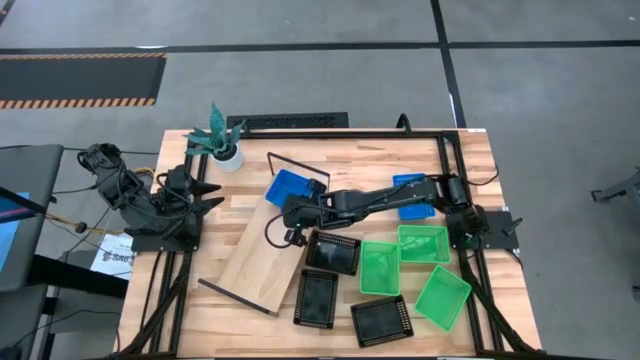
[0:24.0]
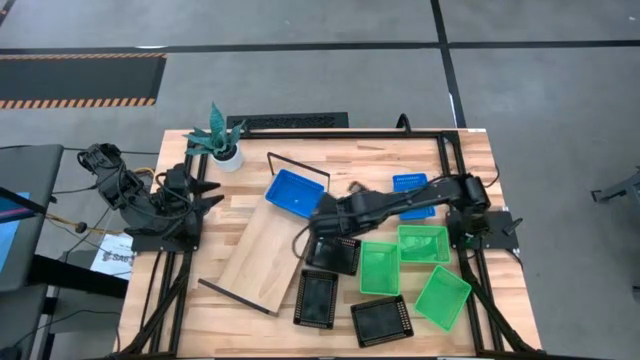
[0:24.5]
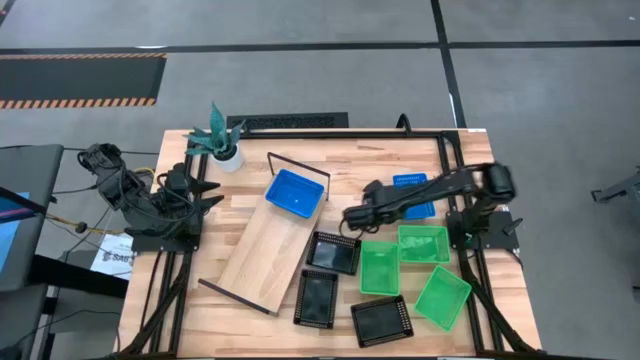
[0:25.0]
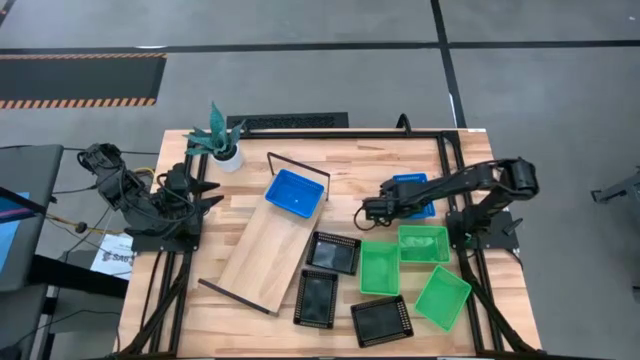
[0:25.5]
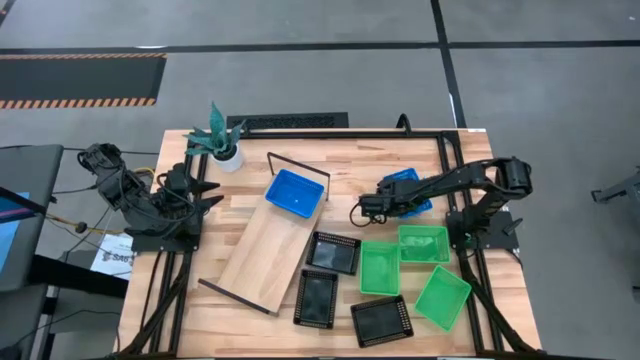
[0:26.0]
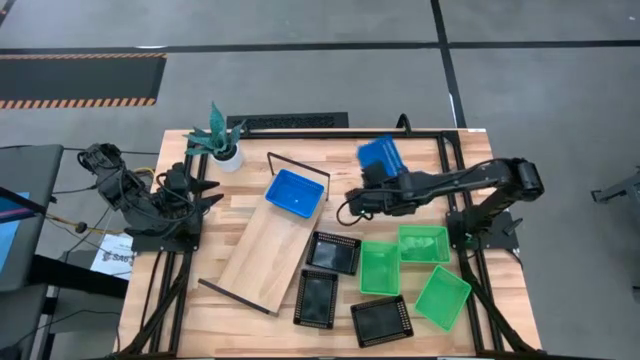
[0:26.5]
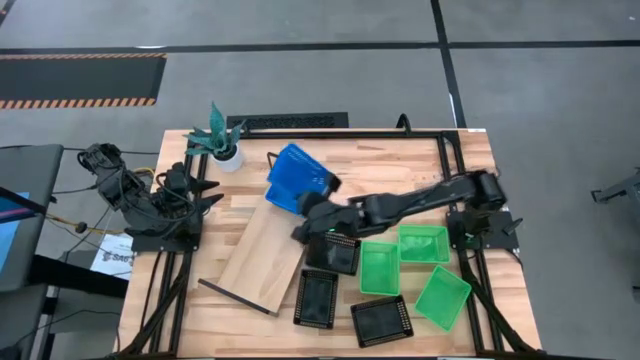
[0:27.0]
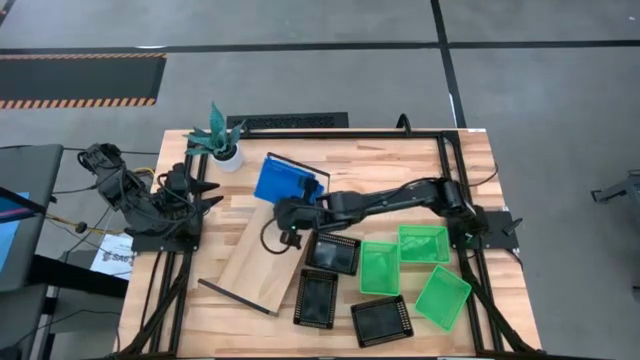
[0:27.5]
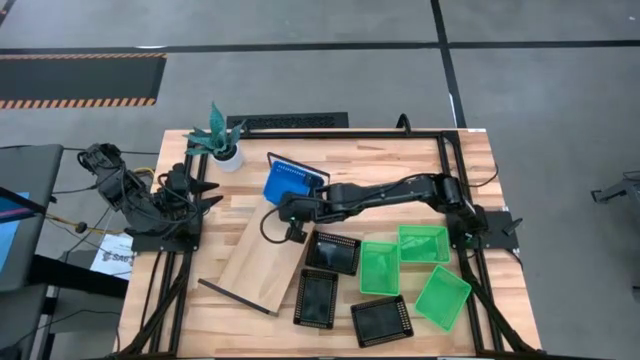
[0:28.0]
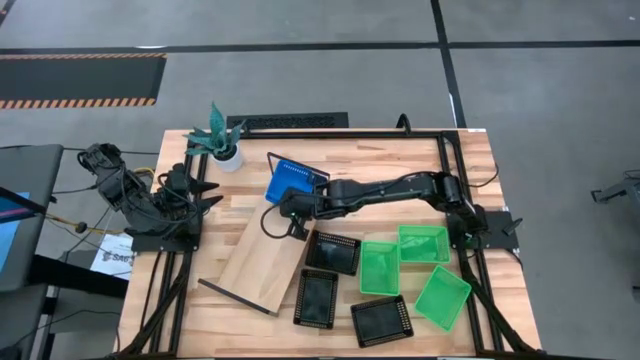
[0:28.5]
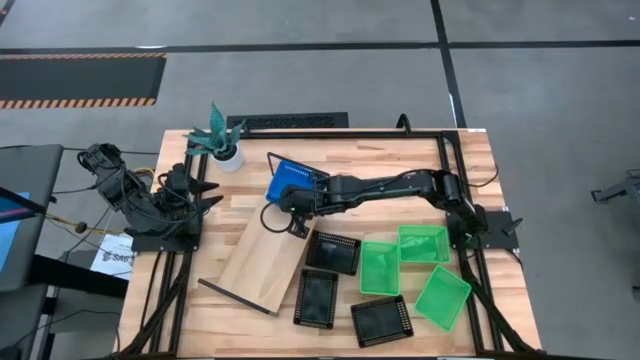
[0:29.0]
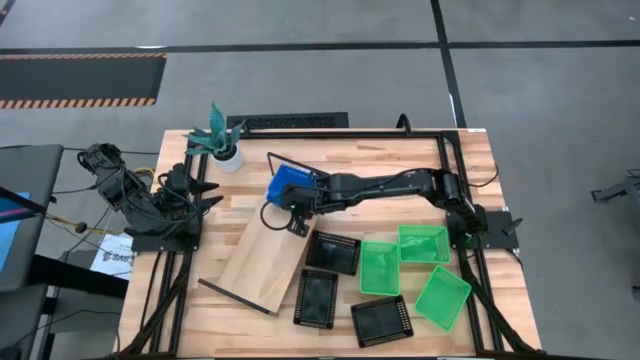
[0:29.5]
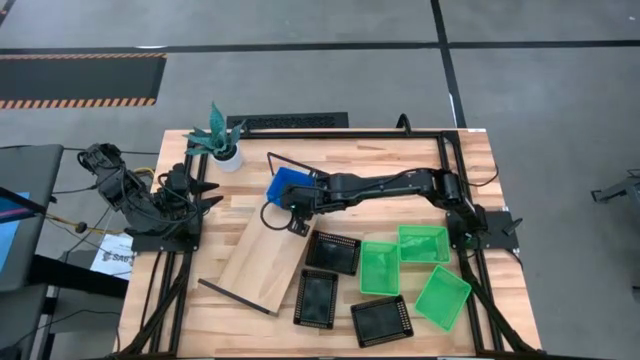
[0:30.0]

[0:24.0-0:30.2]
Task: Stack baskets on shelf by color
Stack the blue bin on top of the blue bins on the shelf

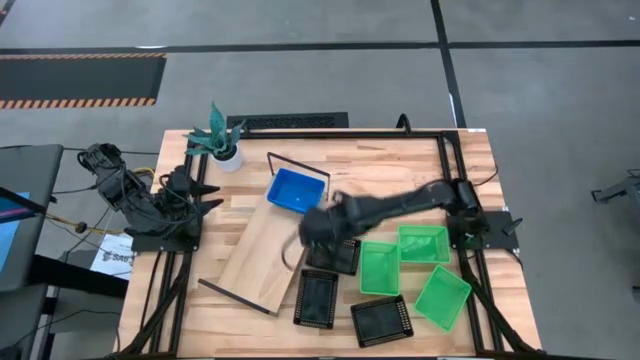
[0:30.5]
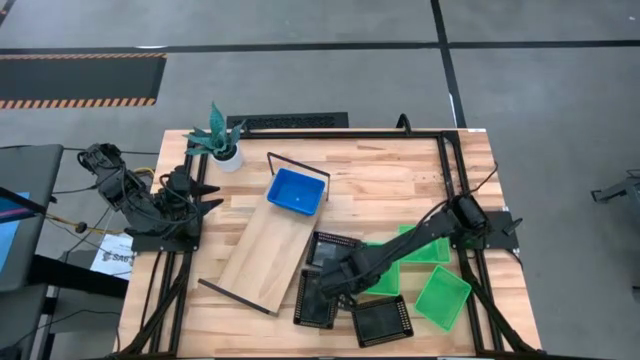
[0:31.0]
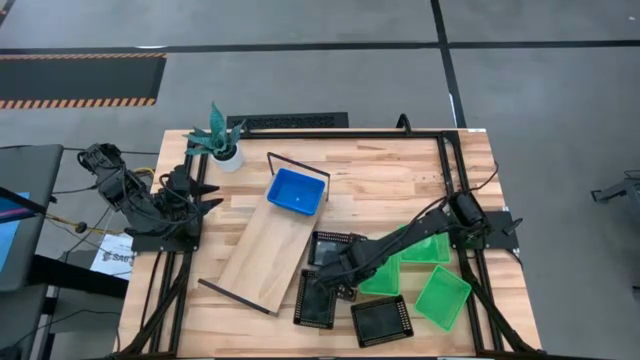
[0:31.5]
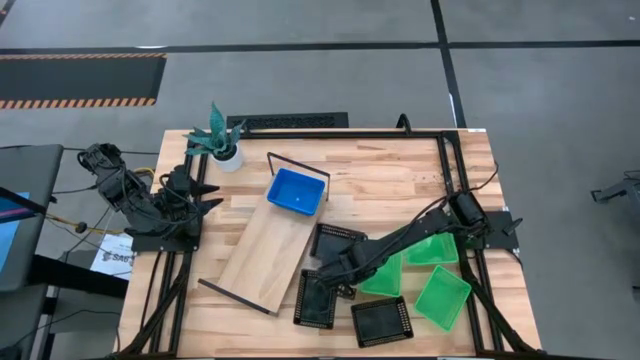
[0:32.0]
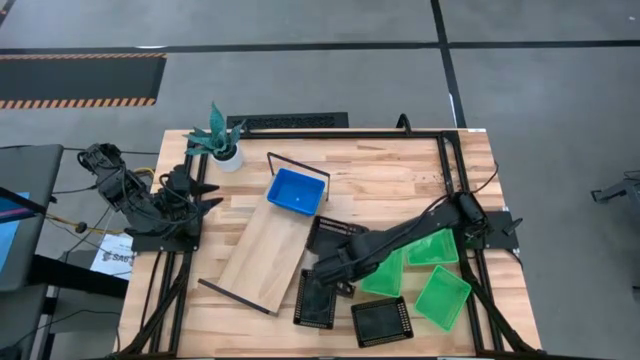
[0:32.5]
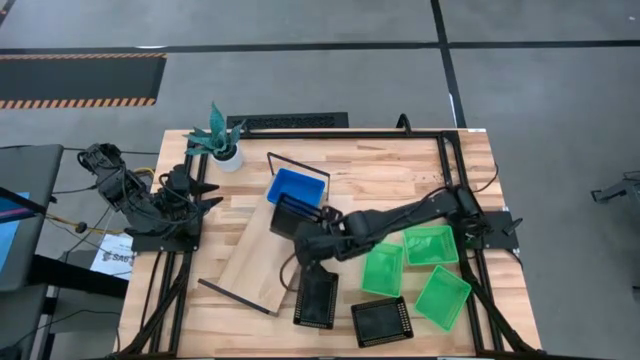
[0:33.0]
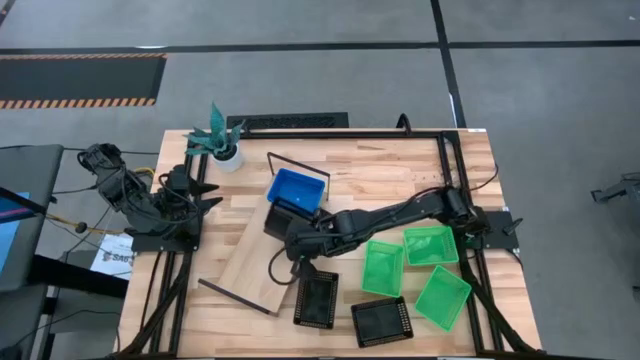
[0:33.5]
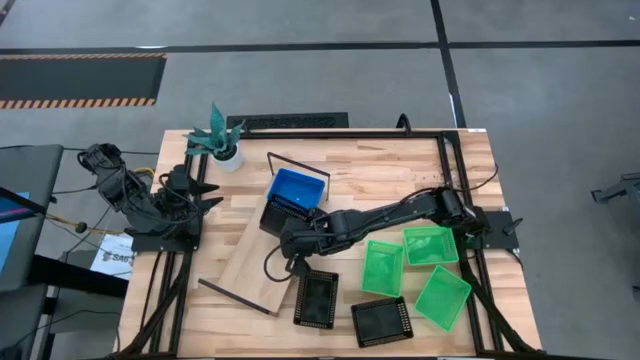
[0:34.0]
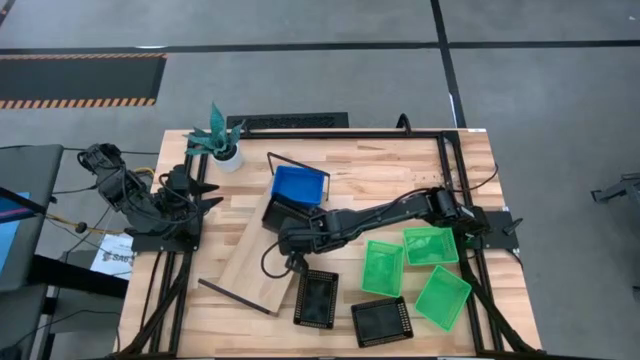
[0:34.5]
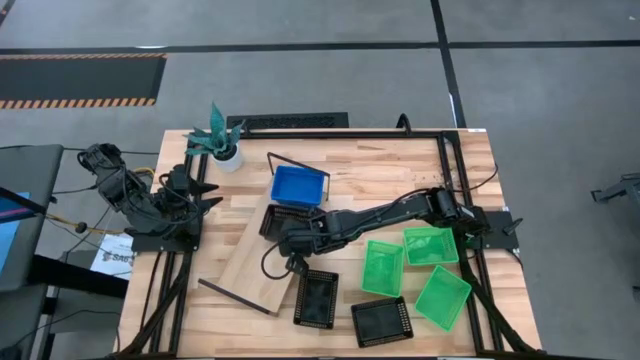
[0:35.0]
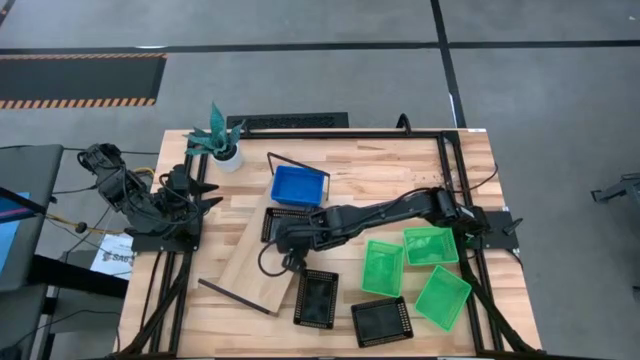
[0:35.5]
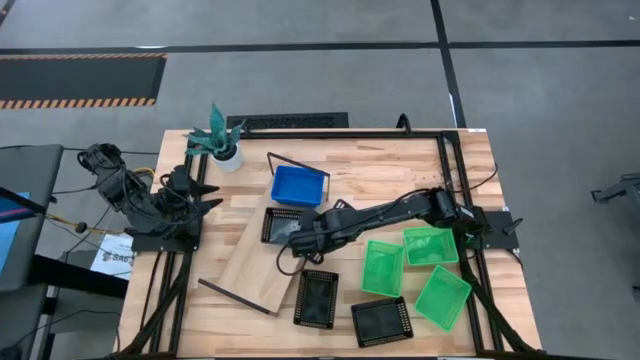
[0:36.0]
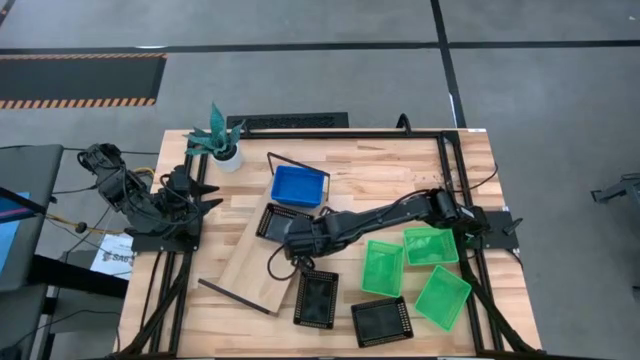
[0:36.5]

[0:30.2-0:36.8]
Put the top black bin on the shelf

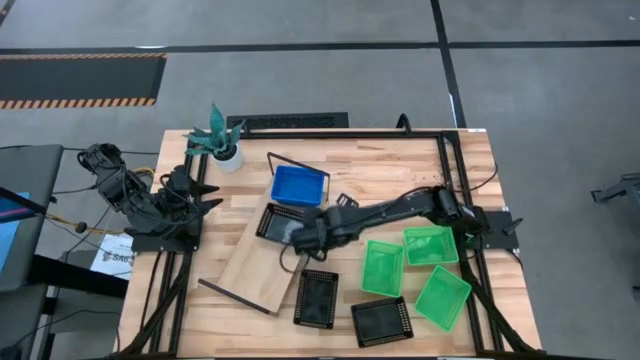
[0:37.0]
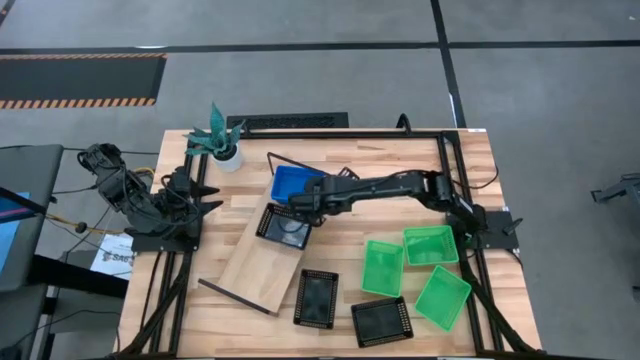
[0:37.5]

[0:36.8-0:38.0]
Adjust the stacked blue bins on the shelf

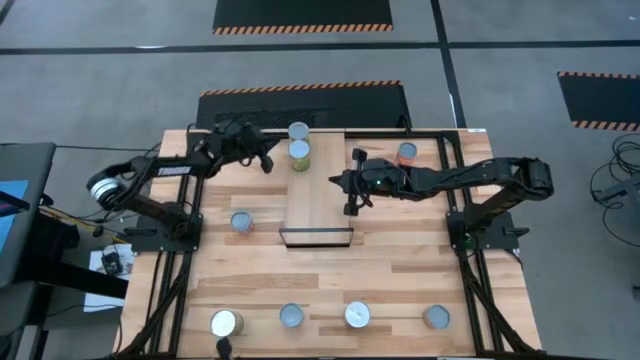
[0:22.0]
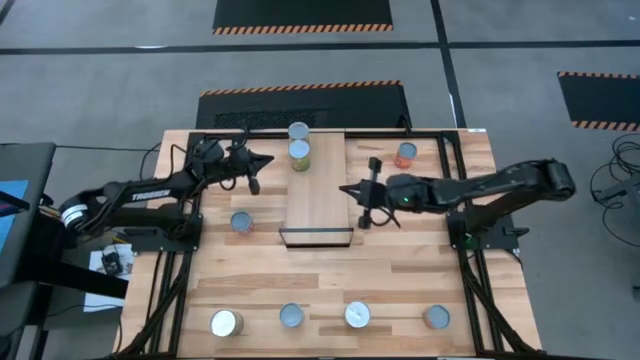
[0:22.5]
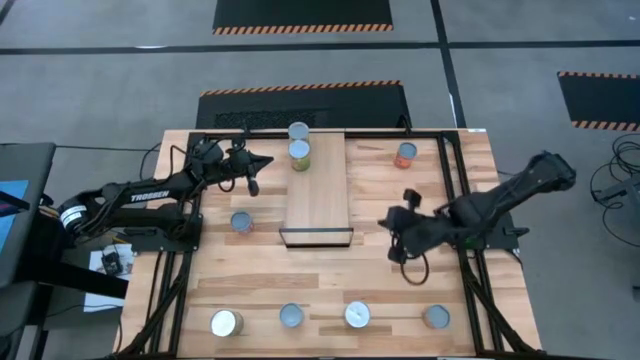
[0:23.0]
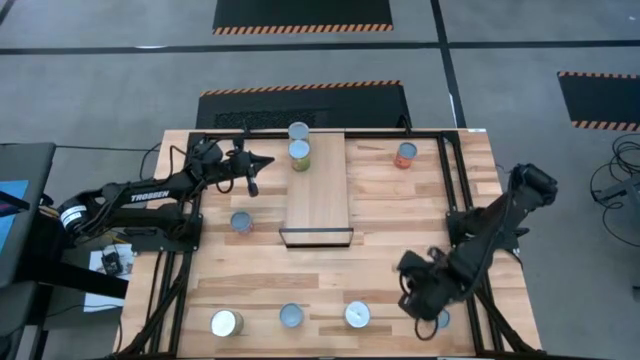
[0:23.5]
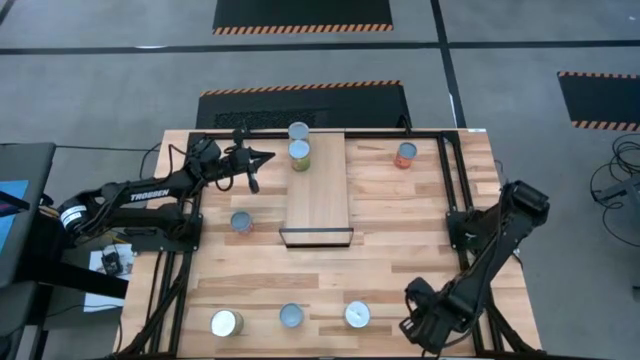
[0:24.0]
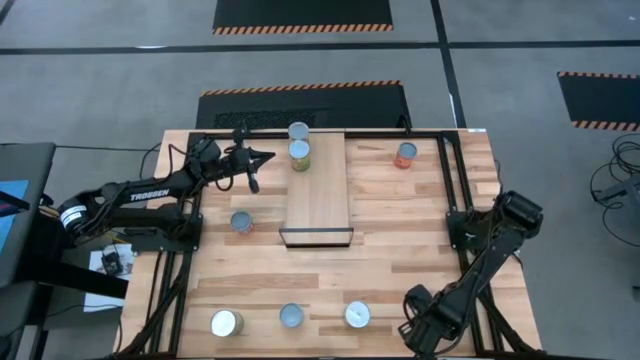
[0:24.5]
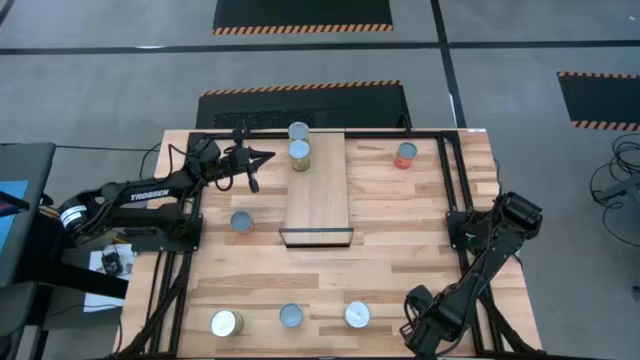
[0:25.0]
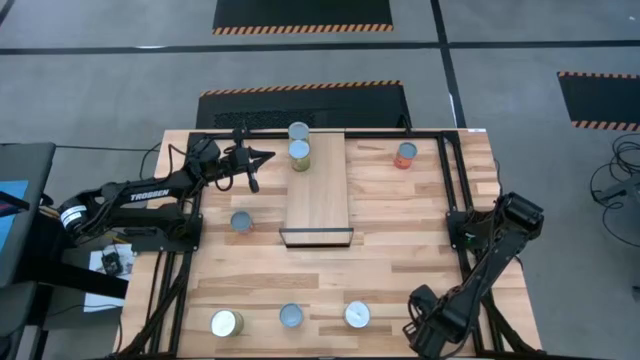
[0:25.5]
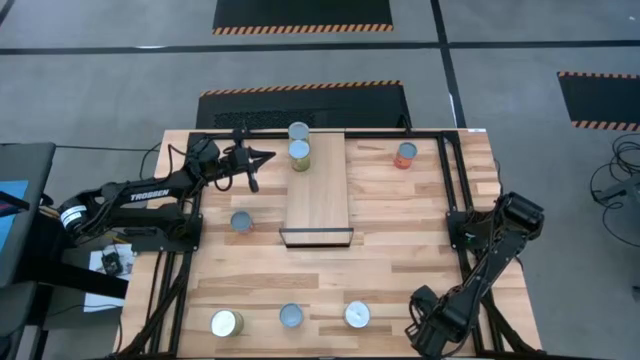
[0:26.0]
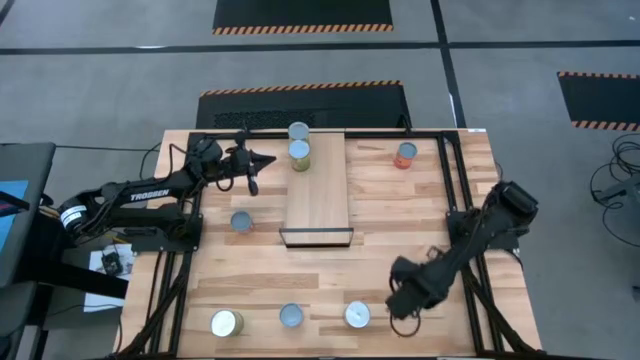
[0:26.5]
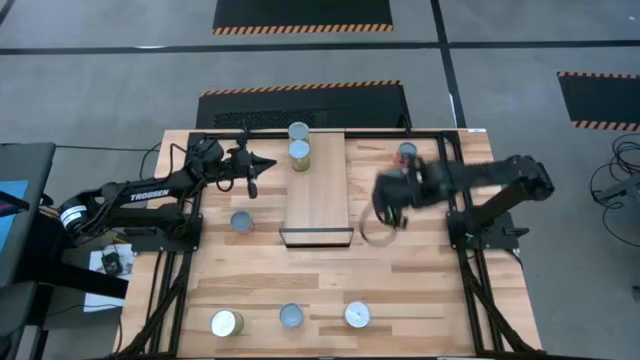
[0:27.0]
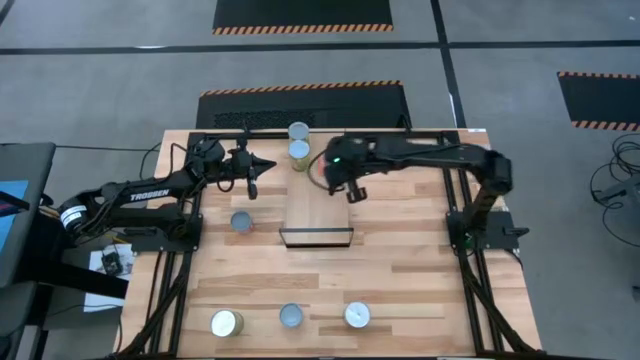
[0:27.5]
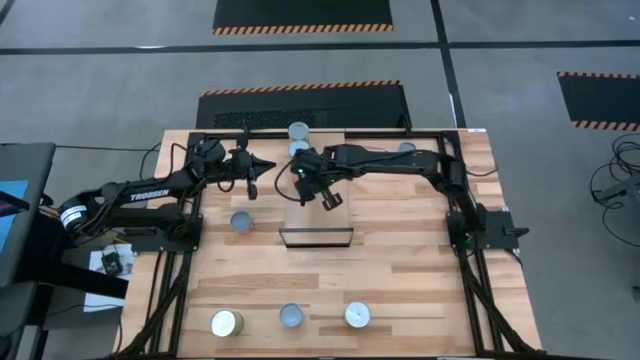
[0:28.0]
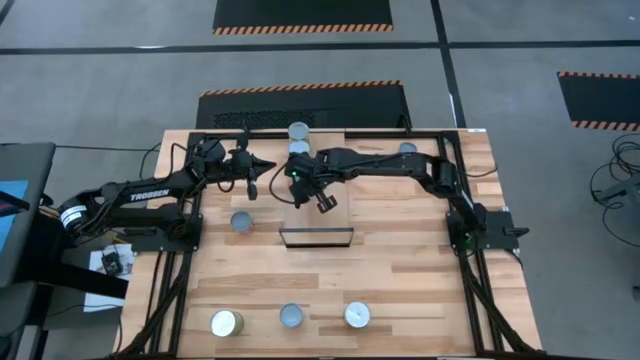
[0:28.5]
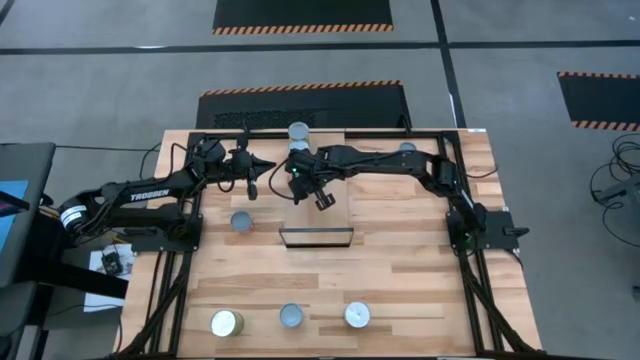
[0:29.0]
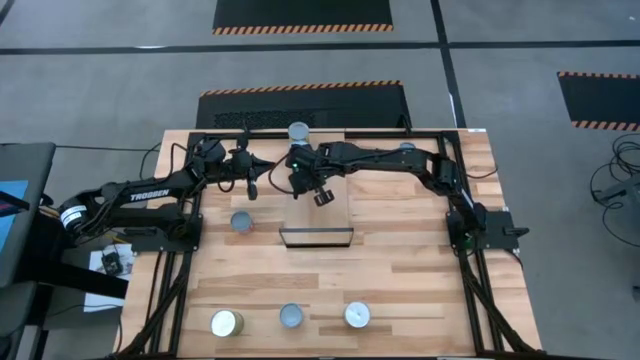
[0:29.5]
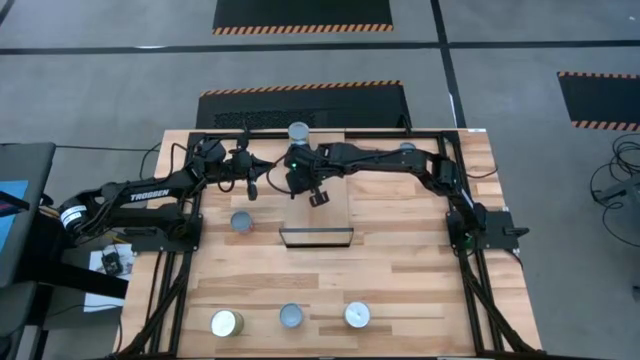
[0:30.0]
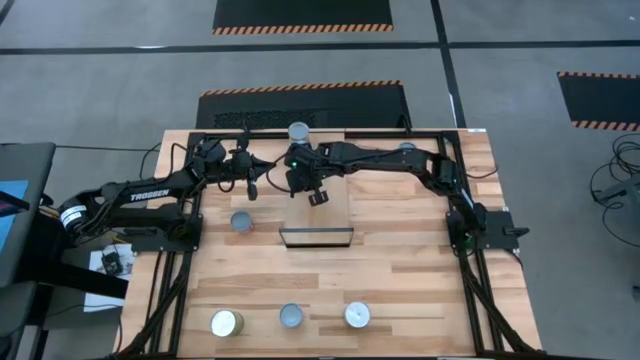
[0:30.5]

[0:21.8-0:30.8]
Task: Pick and place cans onto a shelf
Put the canned oranges on the shelf
